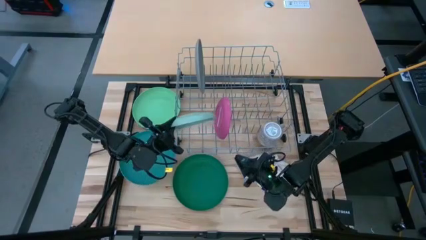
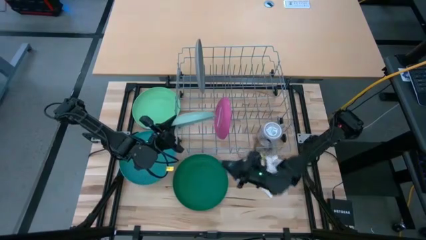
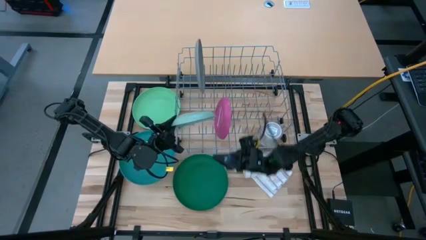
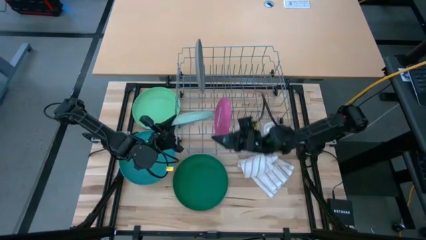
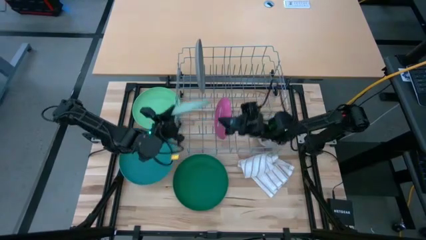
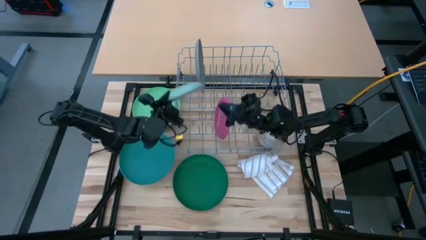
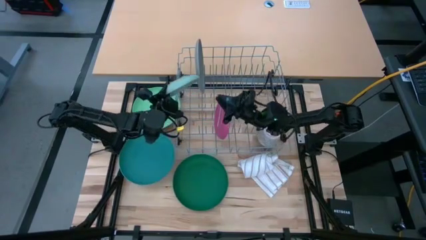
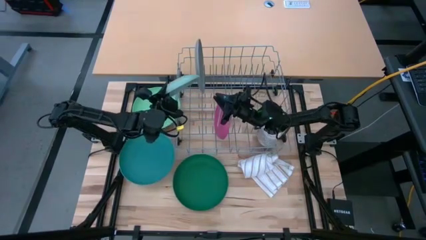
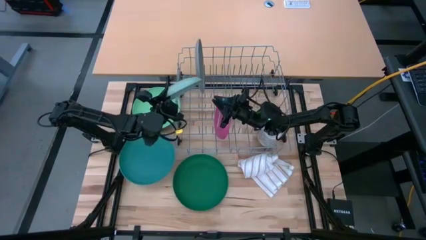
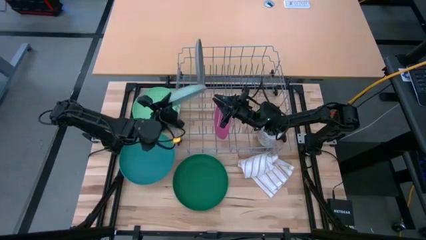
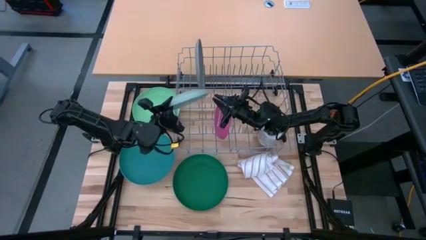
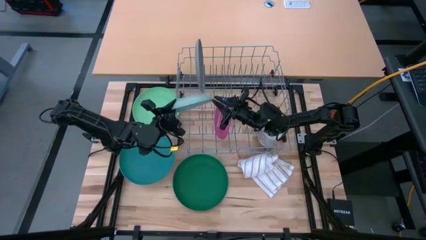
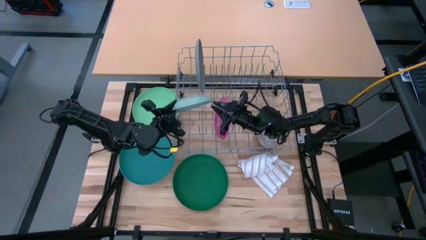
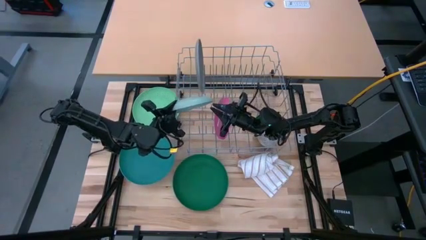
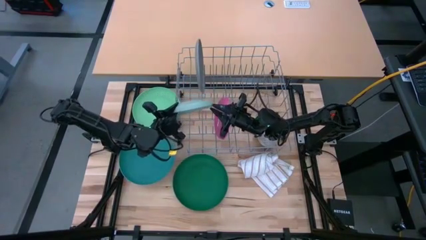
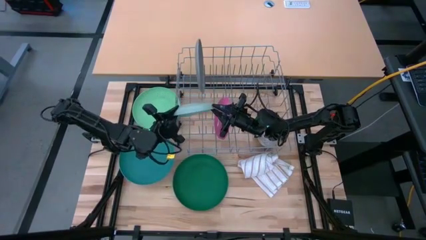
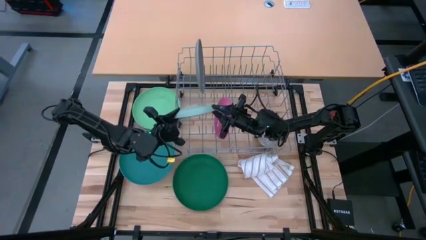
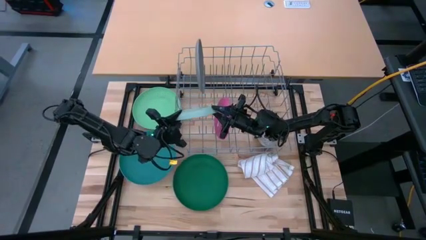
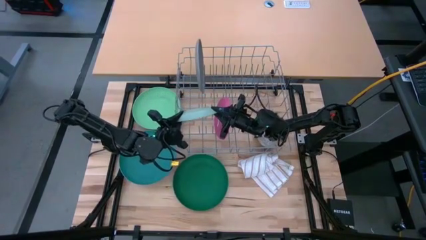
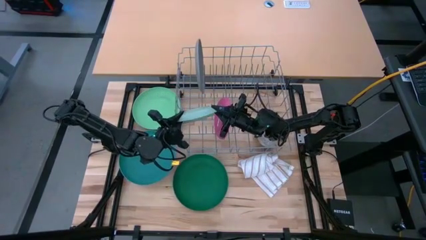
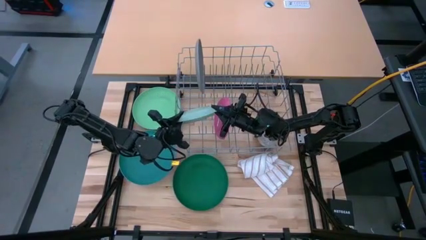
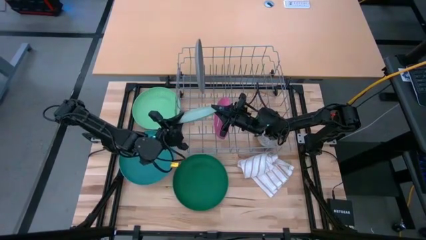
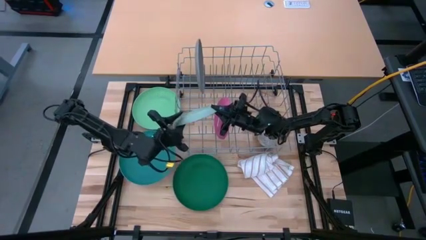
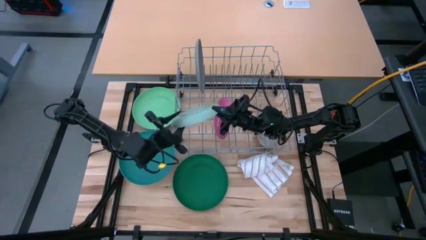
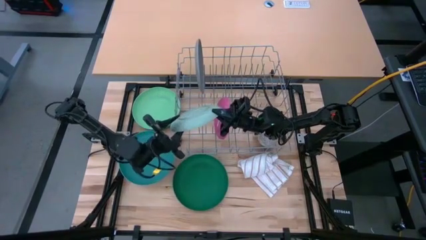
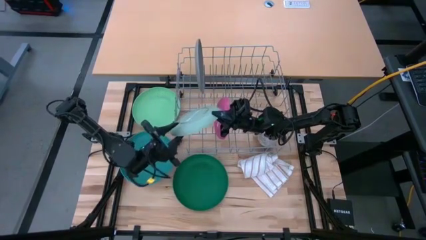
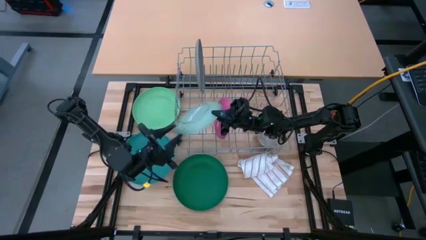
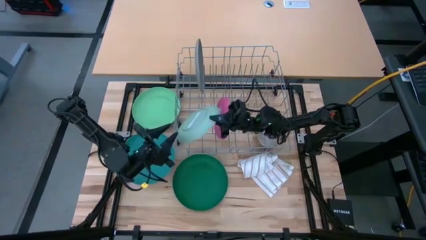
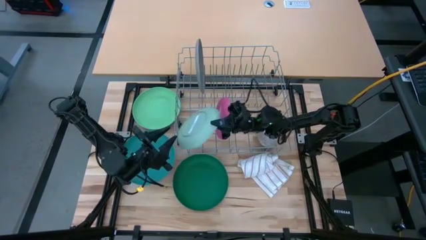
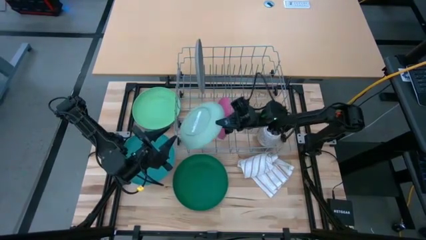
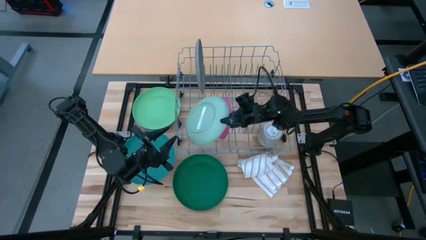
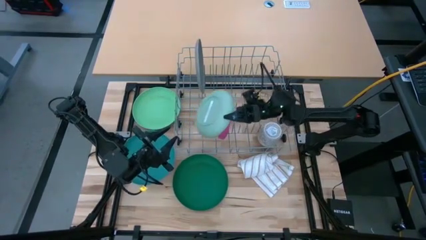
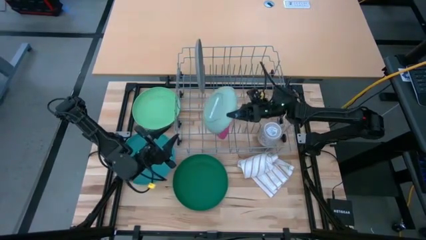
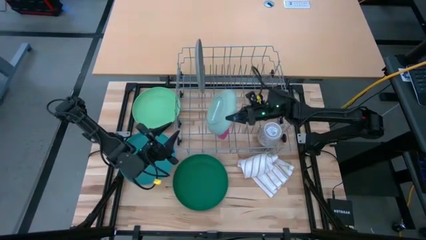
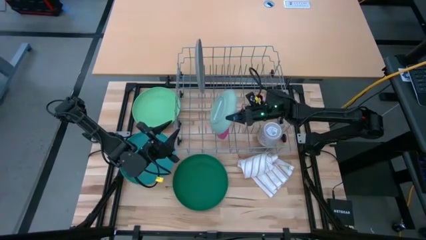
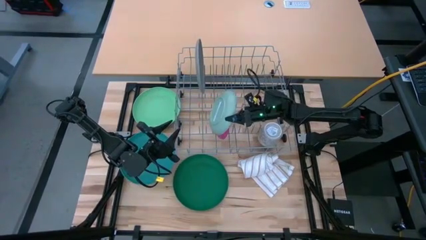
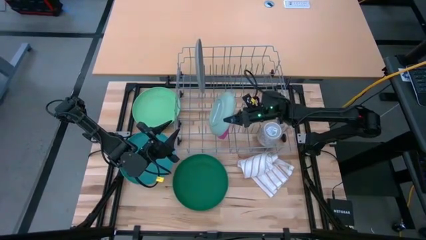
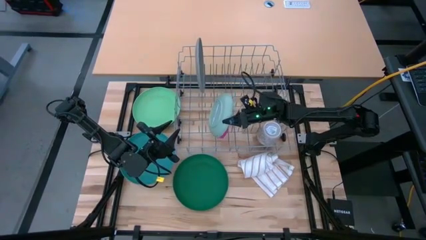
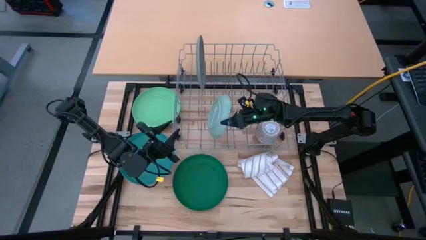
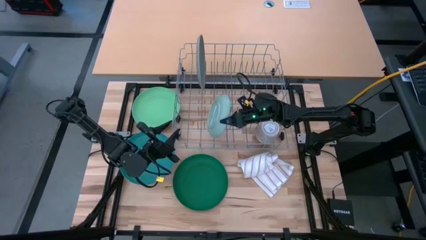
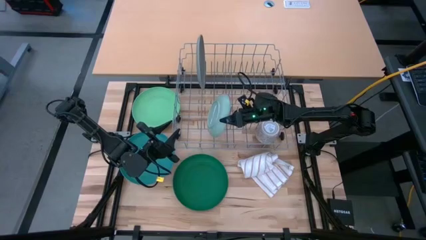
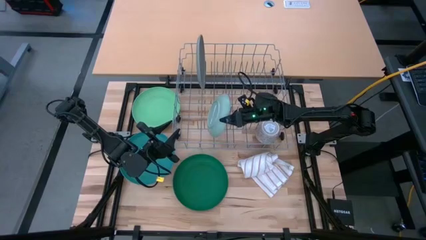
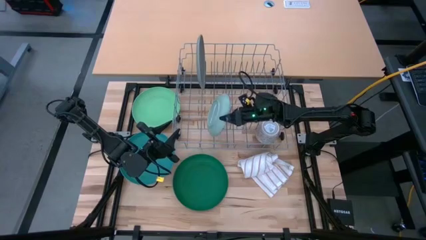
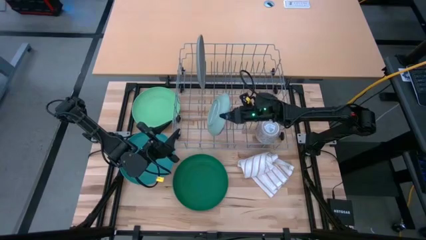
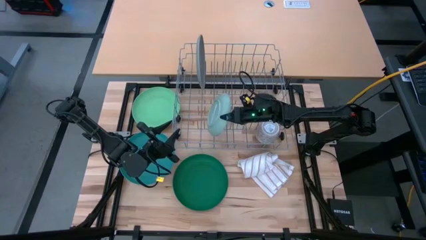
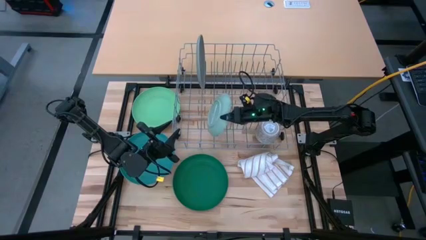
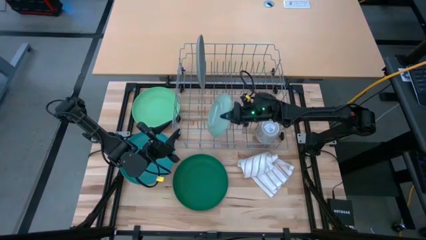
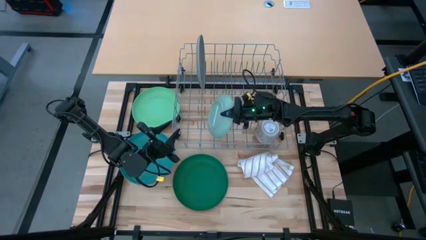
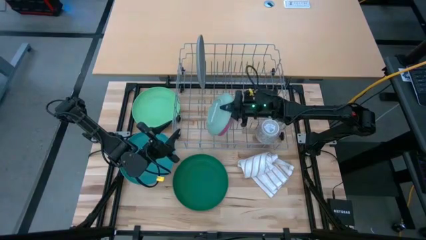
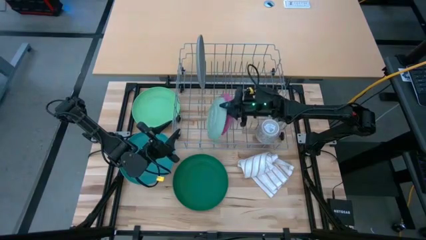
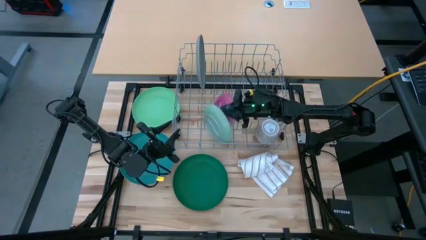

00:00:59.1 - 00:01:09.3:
Task: Sort dishes
Put the light green plate in the dish rack

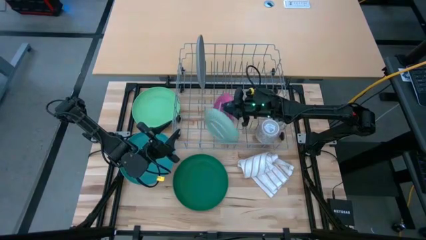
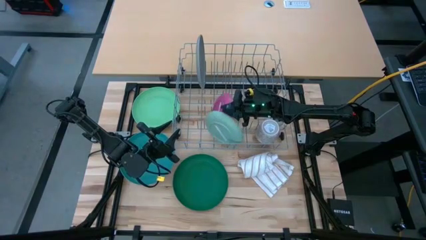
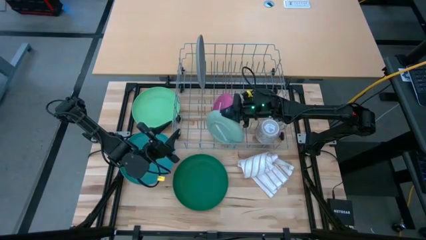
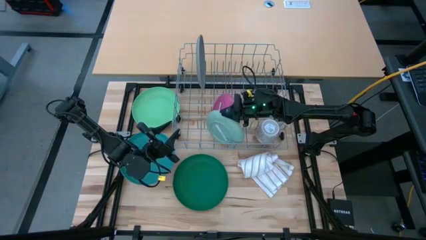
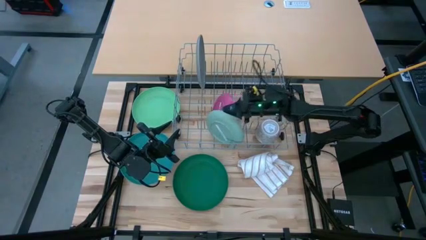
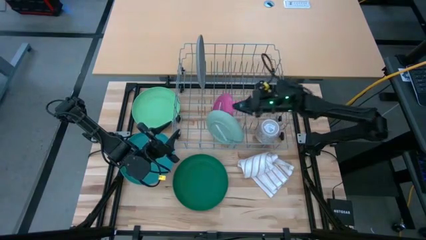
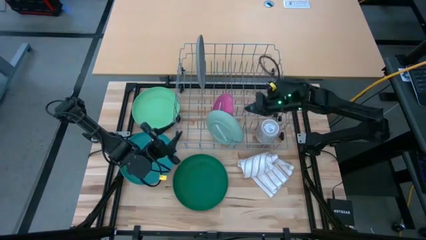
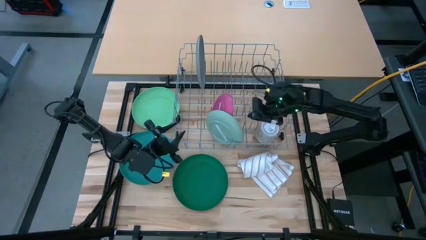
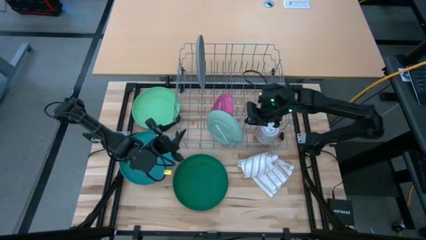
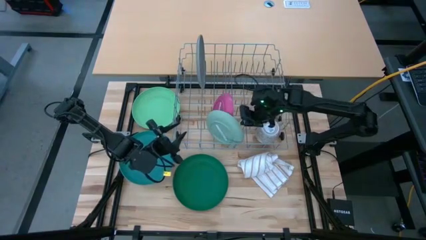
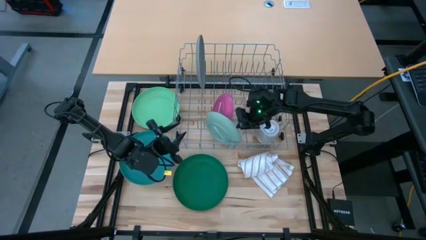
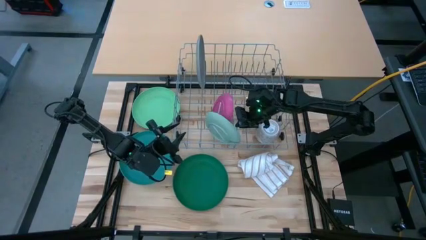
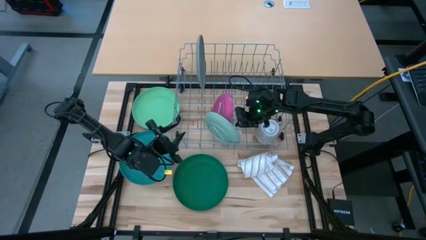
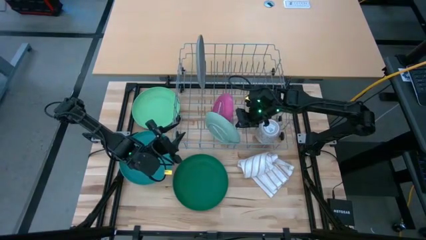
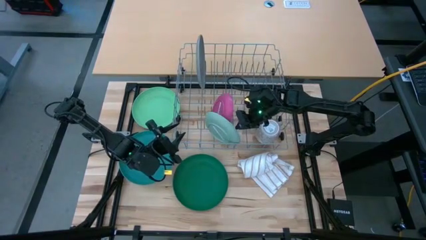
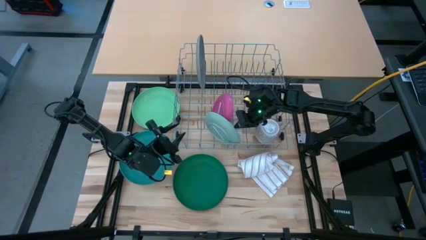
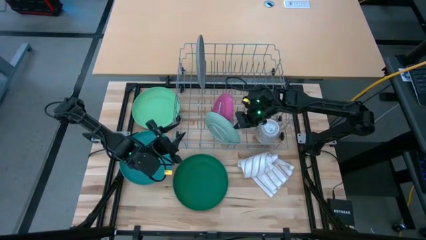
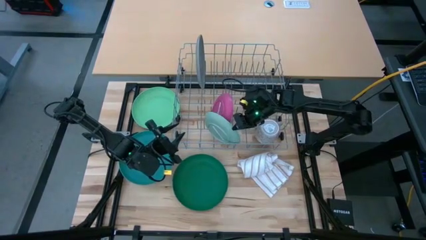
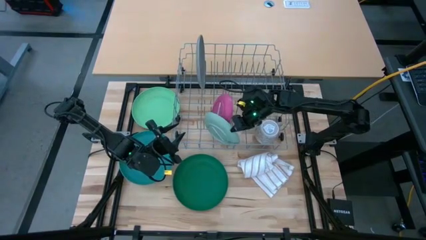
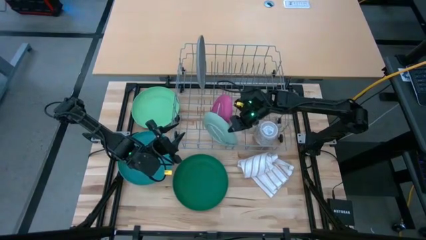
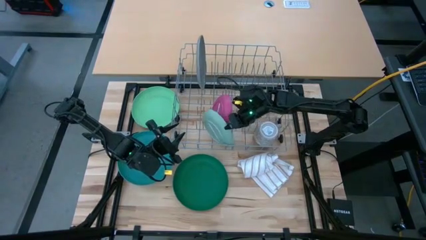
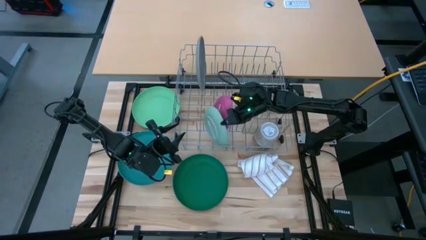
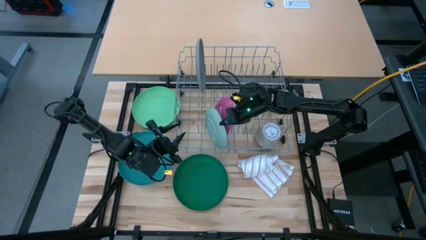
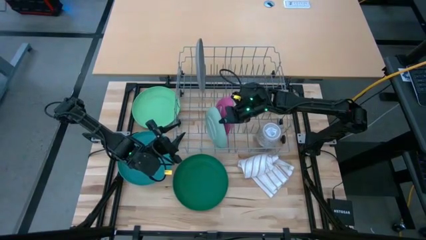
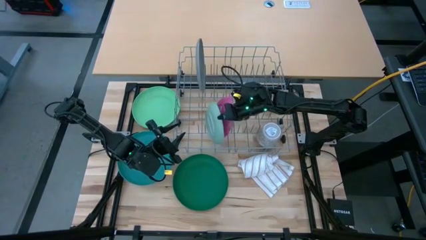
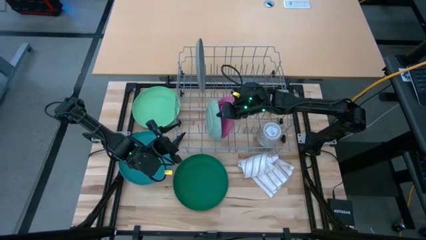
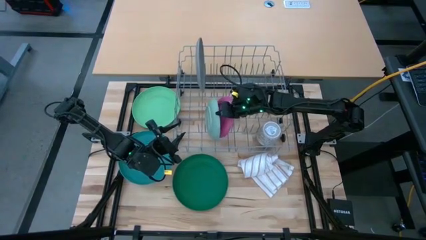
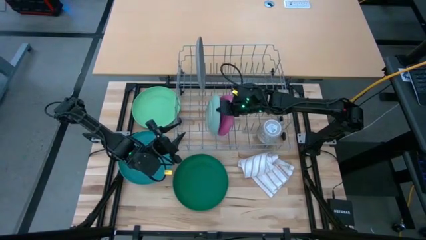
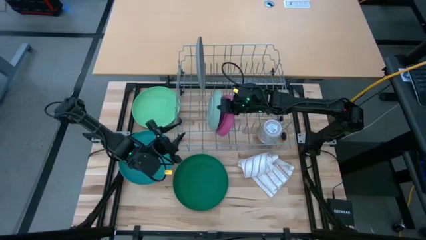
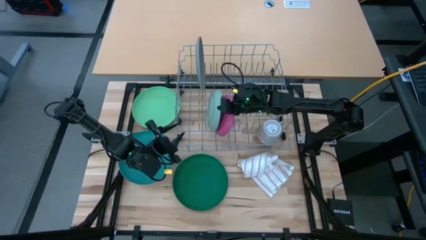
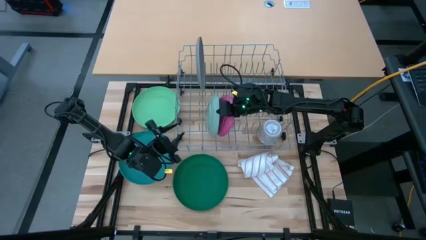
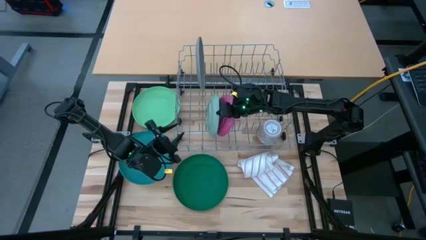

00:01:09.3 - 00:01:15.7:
Put the light green plate in the dish rack
